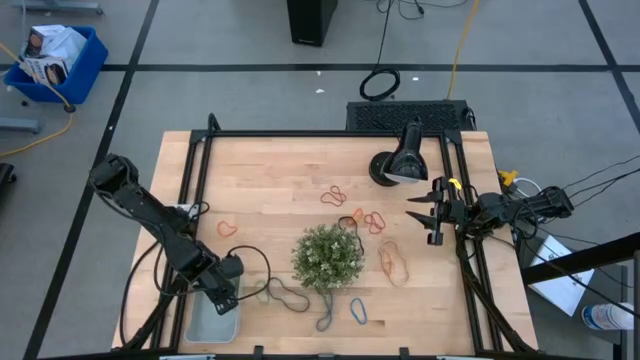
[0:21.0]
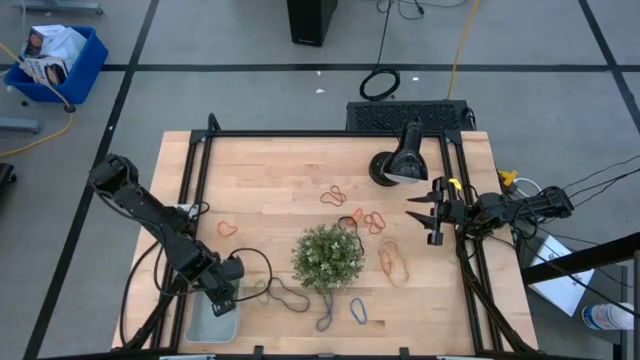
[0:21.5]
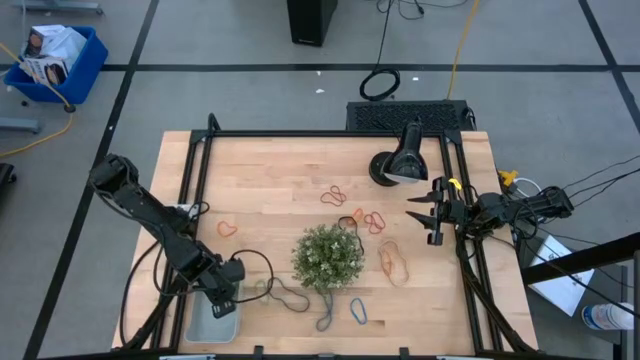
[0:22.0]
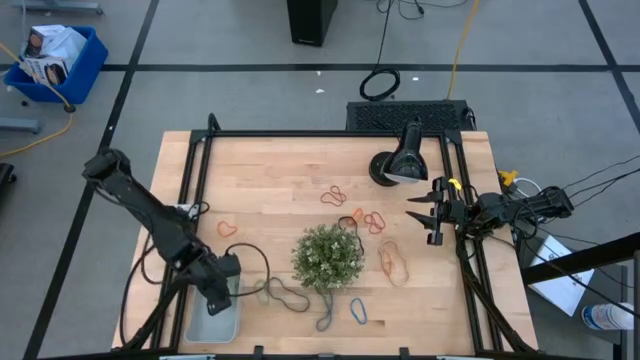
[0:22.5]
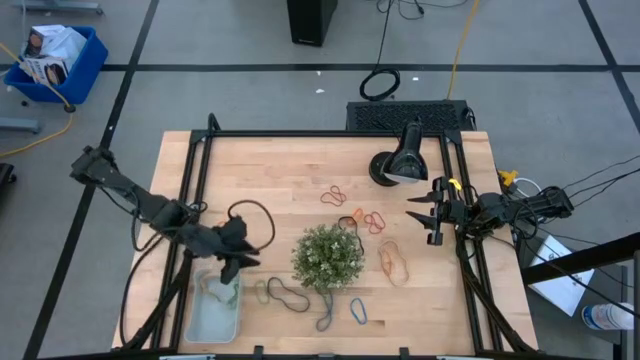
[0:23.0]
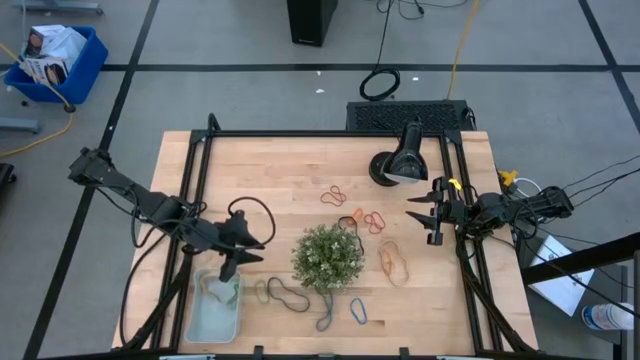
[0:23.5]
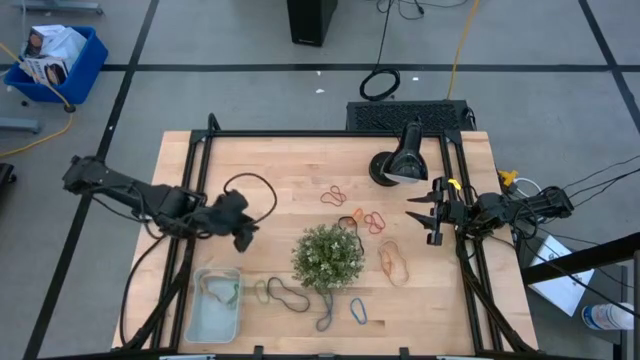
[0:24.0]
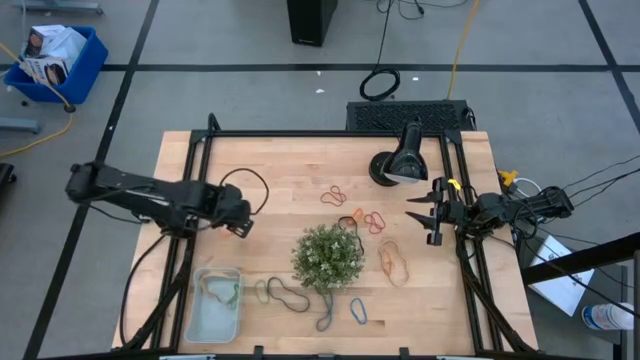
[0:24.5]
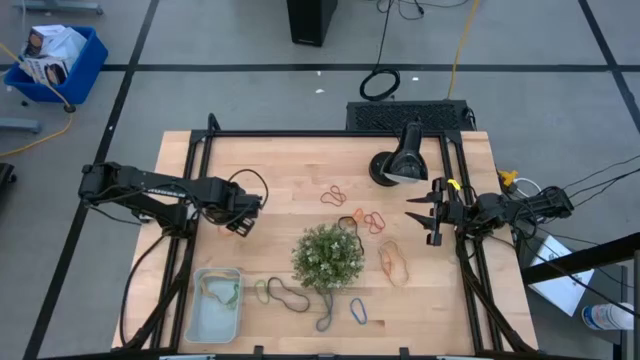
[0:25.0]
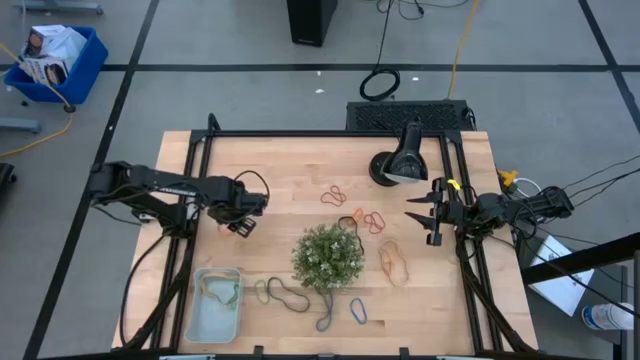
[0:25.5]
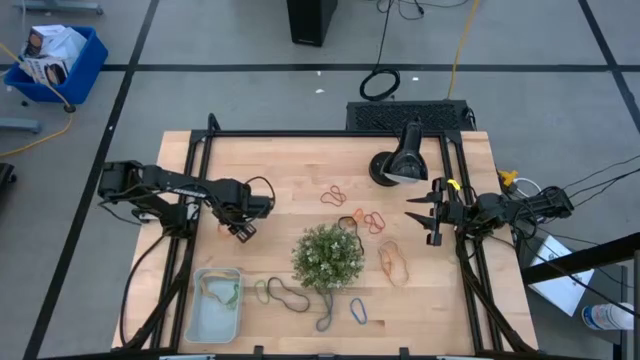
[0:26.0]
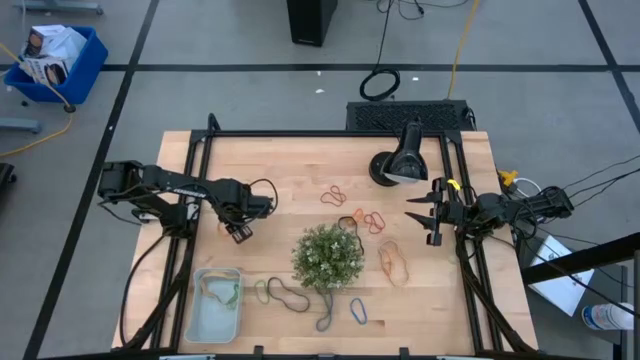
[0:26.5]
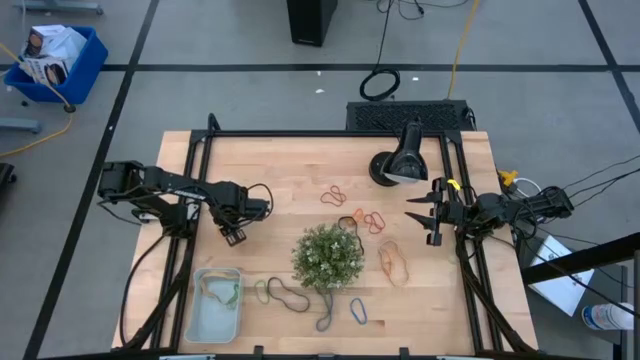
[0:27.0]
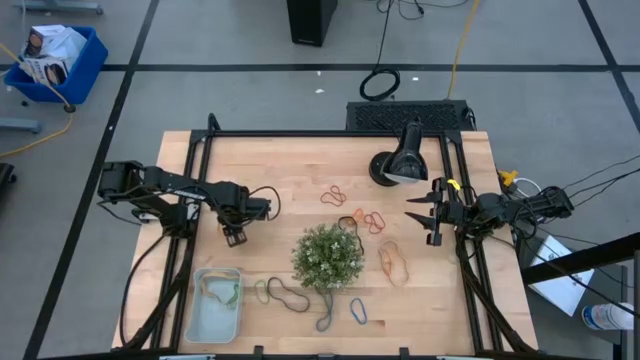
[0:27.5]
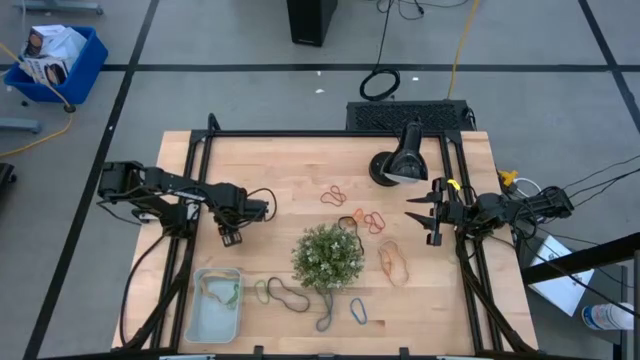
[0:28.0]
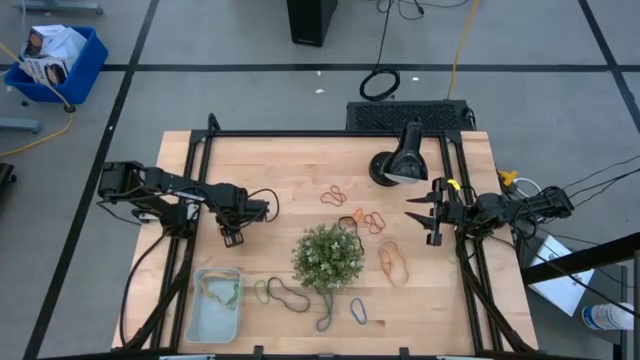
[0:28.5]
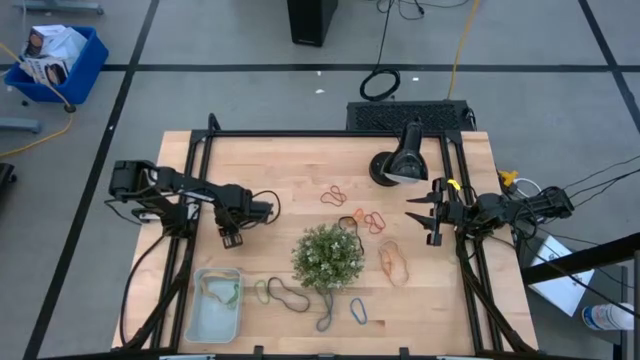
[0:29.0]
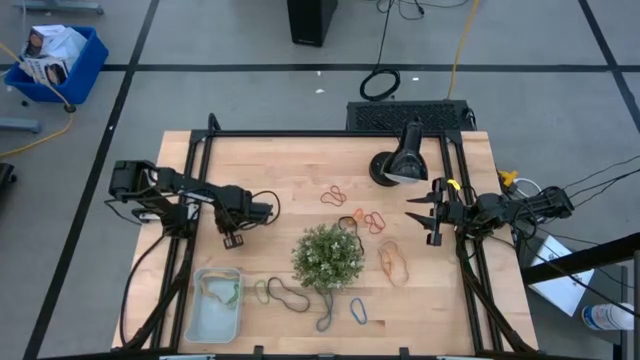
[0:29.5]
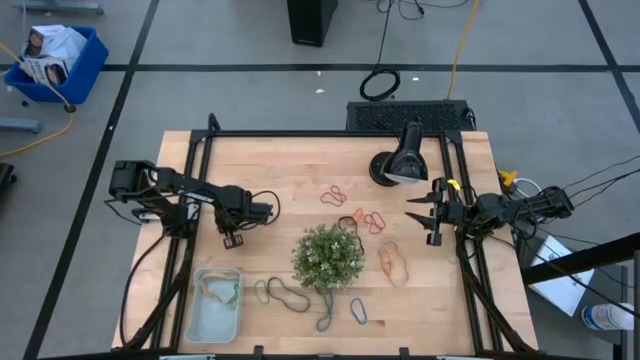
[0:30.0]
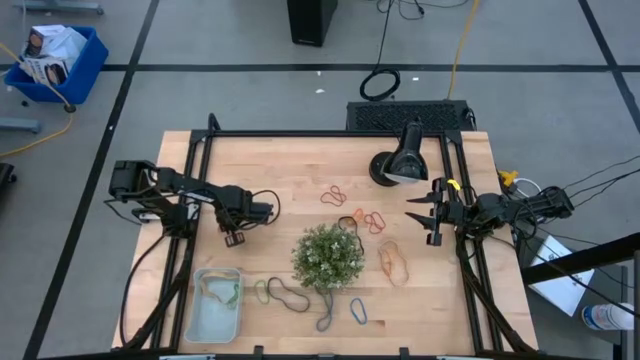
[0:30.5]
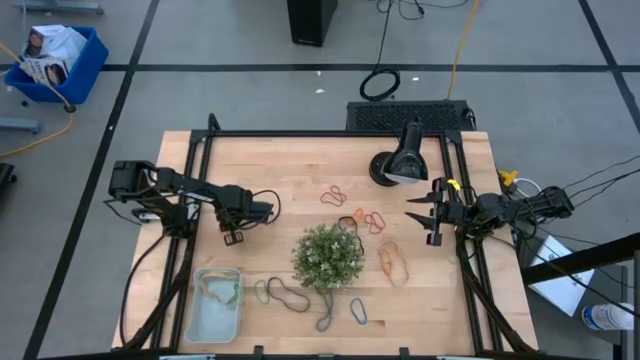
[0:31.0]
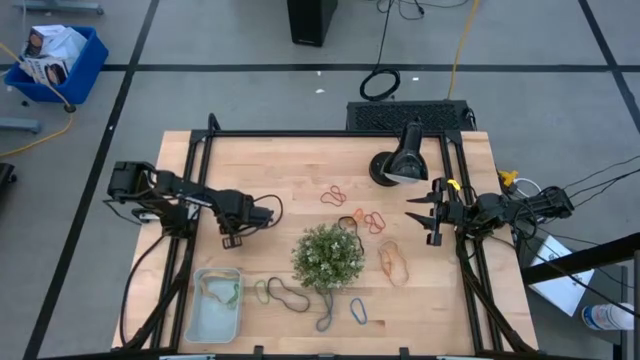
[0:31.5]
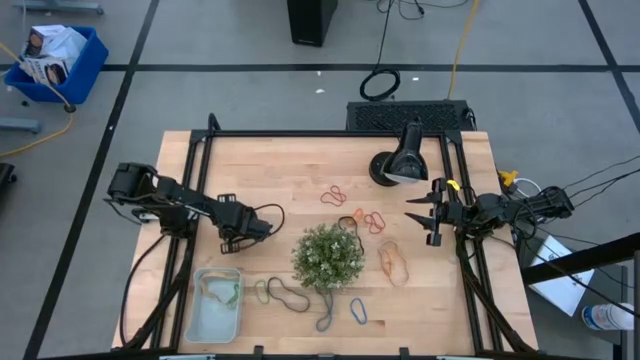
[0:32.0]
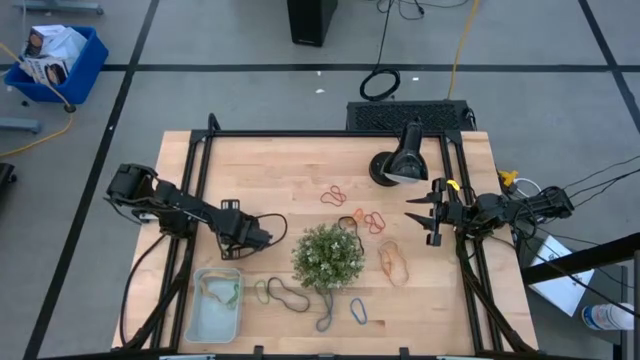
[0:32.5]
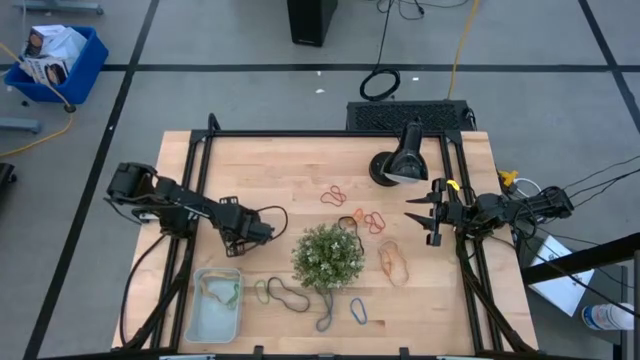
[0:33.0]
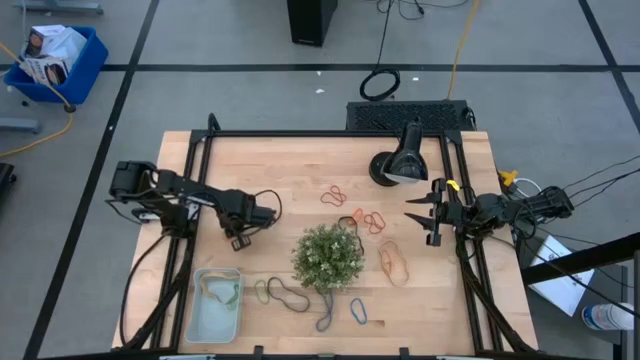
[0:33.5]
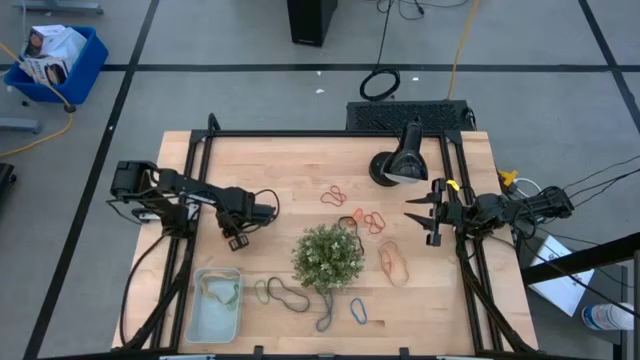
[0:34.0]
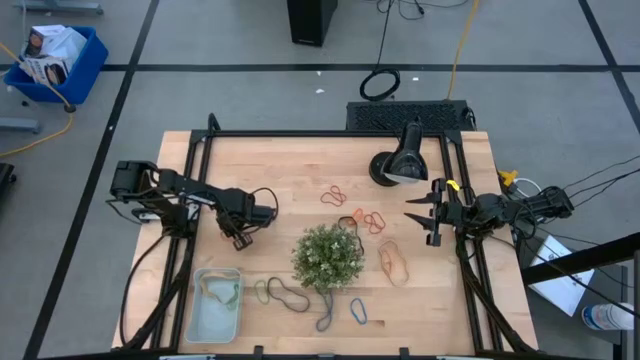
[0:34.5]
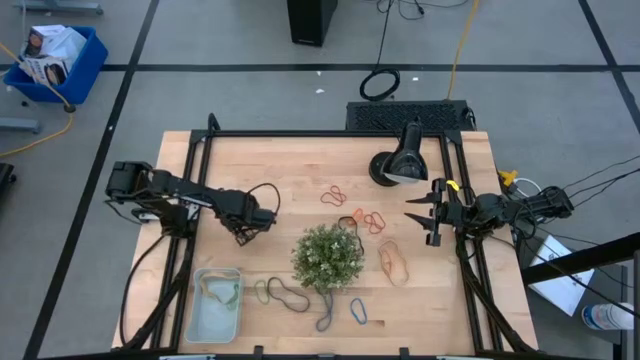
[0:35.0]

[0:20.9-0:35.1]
Task: Pick and place rubber bands into bin
Put the left orange rubber band into the blue bin

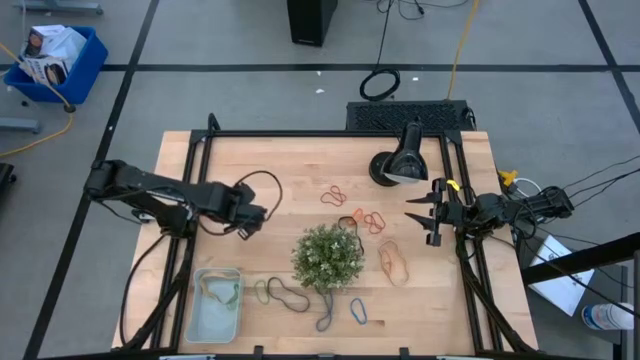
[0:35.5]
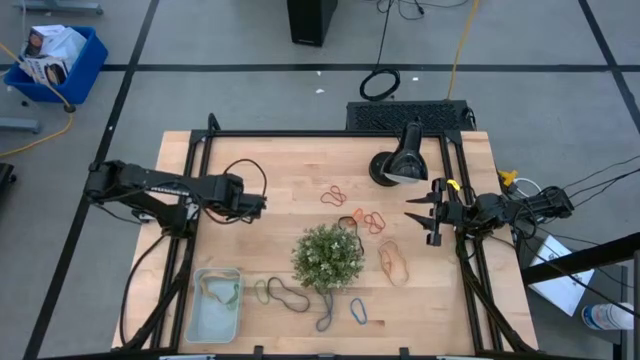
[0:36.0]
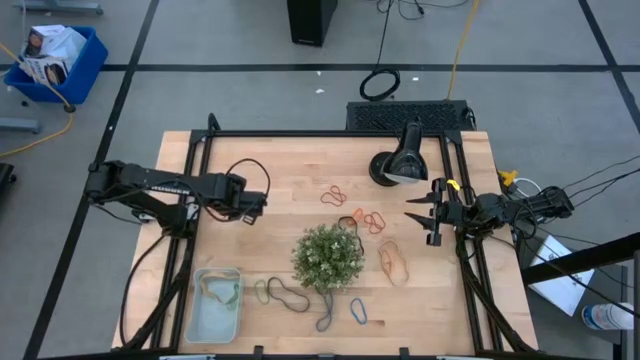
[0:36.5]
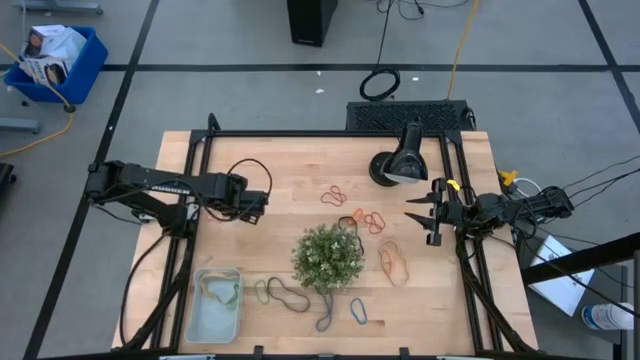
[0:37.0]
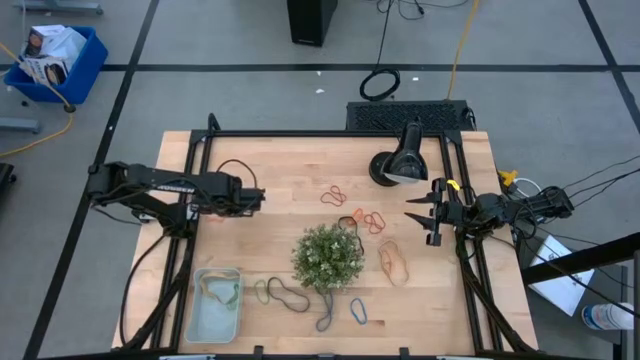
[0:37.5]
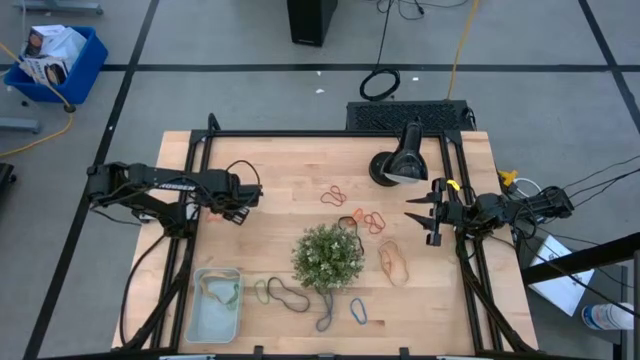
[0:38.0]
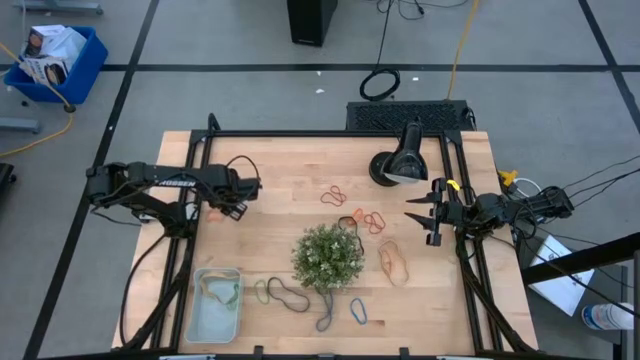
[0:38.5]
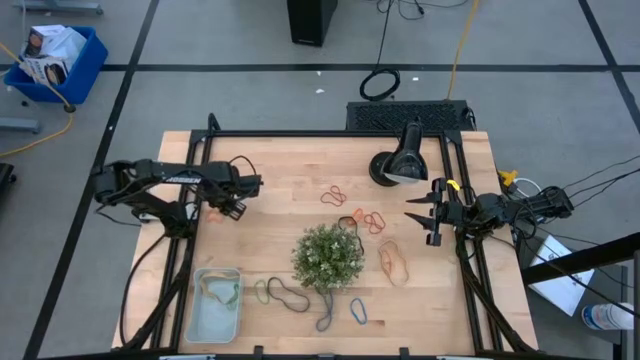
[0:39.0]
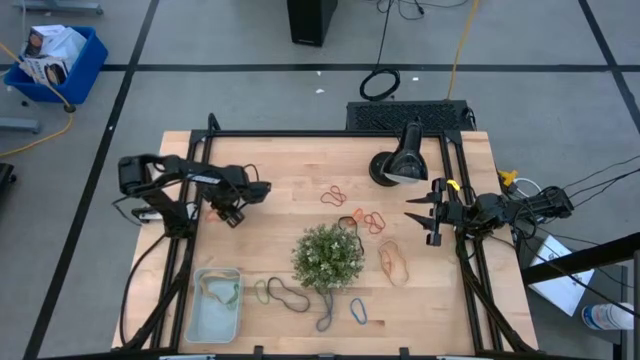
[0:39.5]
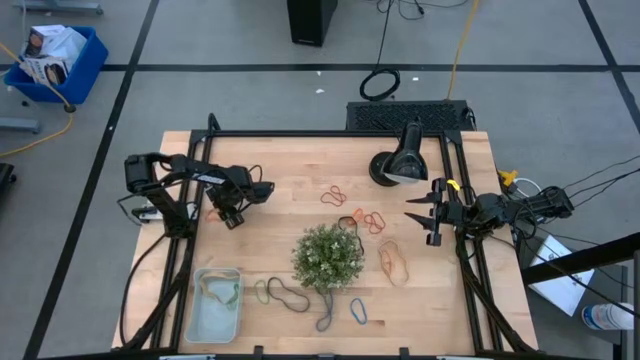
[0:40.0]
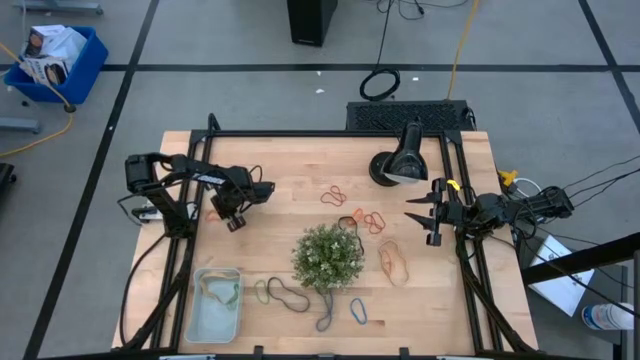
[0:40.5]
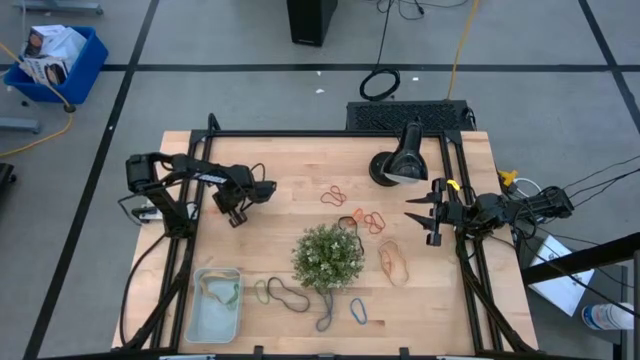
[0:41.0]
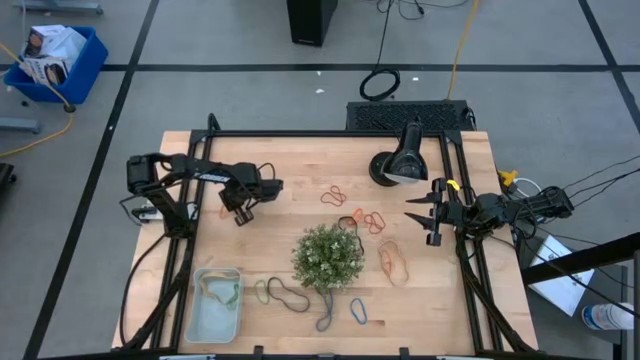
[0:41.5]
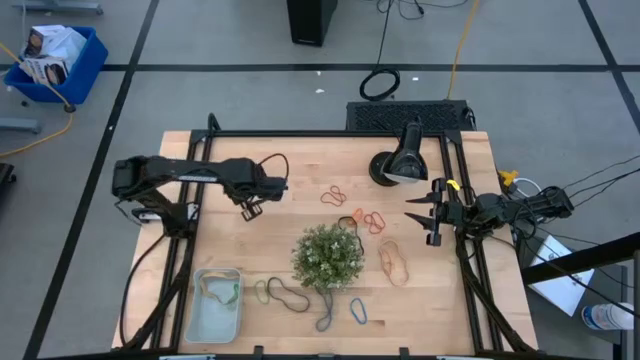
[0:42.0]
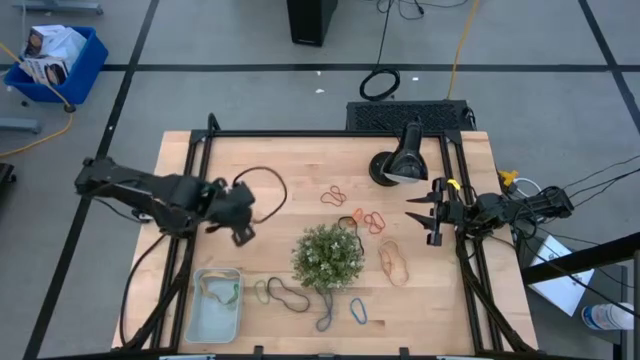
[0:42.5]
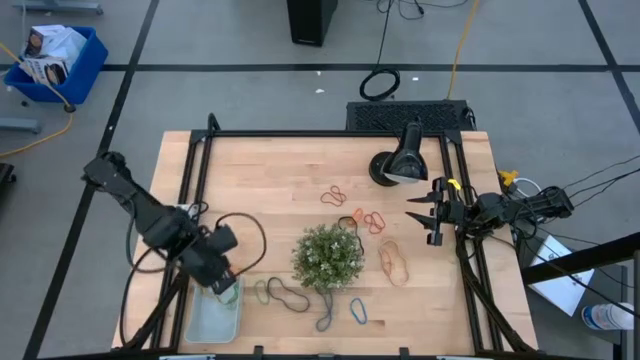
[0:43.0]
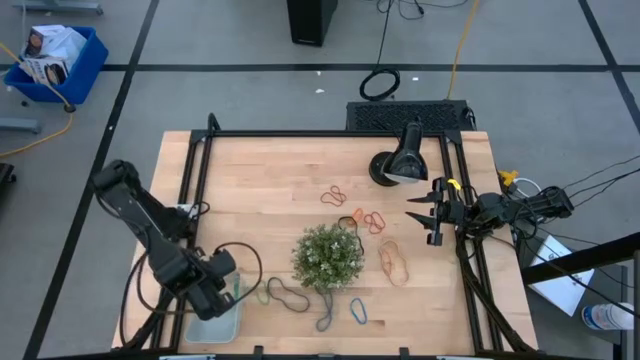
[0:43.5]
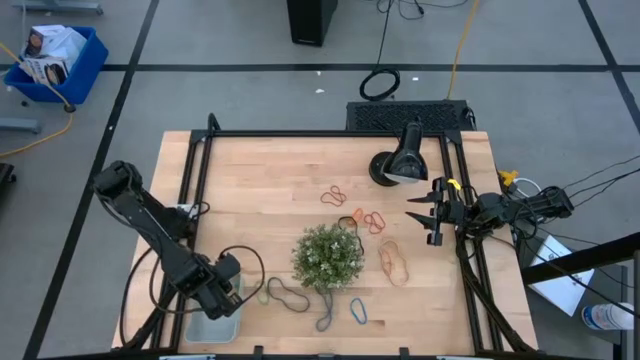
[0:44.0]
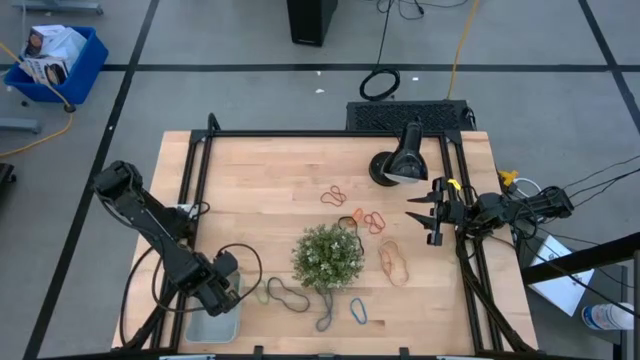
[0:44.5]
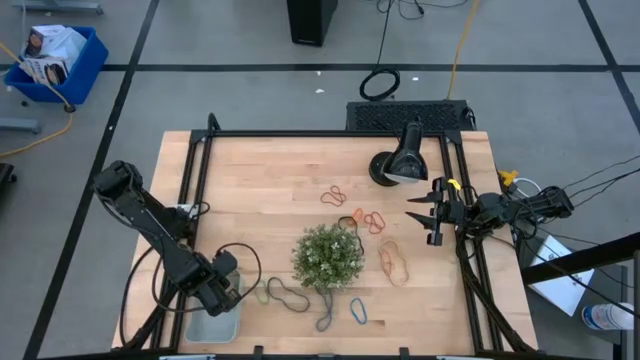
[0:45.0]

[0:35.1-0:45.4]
Put the left orange rubber band into the blue bin
